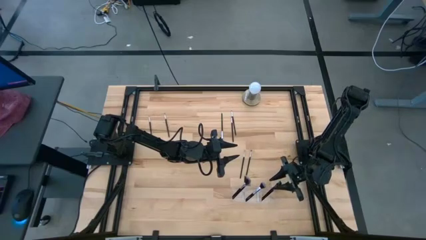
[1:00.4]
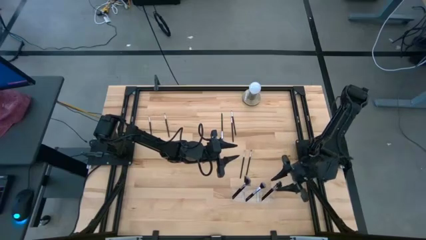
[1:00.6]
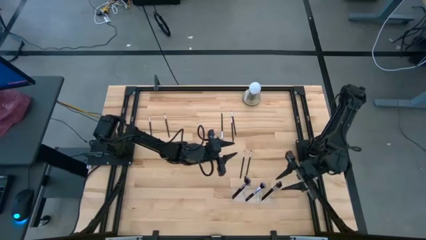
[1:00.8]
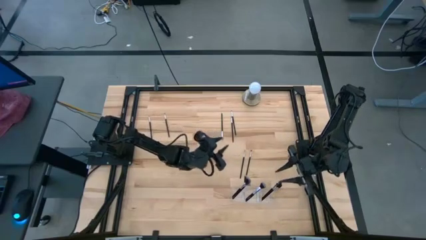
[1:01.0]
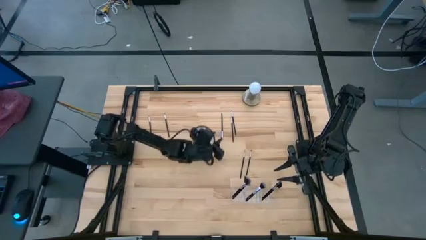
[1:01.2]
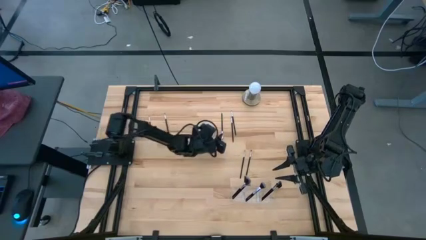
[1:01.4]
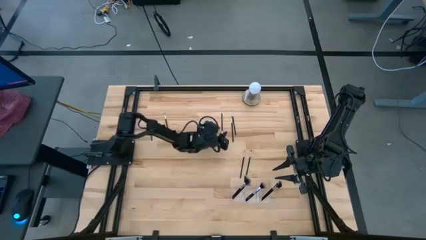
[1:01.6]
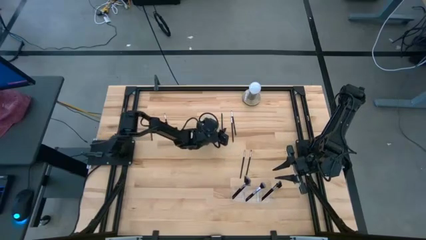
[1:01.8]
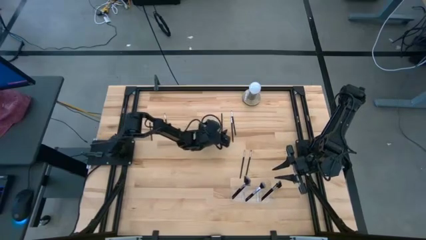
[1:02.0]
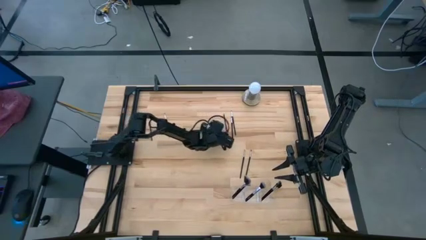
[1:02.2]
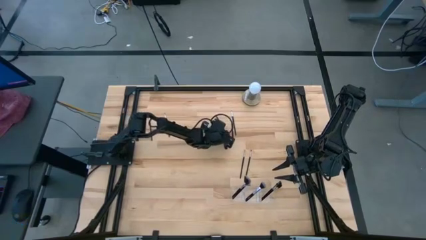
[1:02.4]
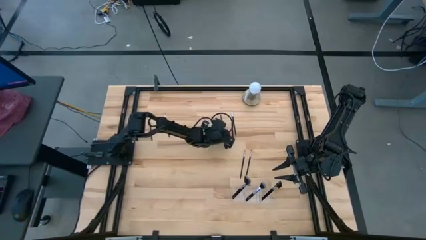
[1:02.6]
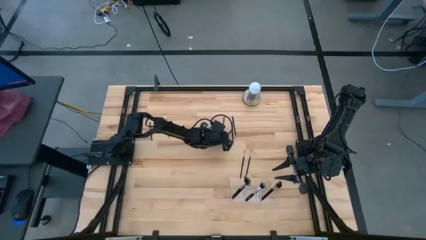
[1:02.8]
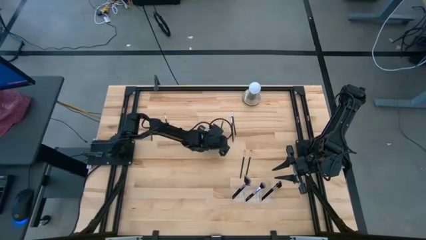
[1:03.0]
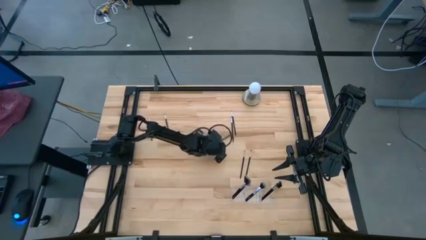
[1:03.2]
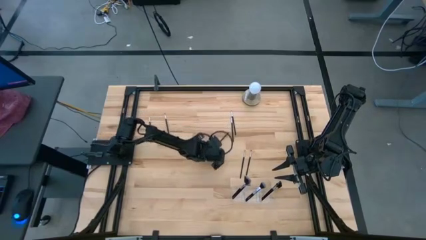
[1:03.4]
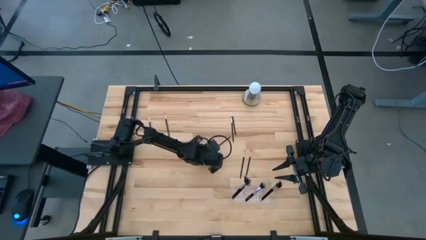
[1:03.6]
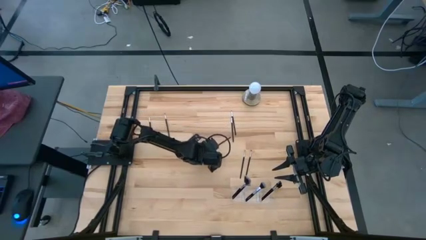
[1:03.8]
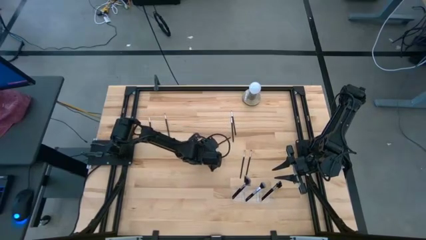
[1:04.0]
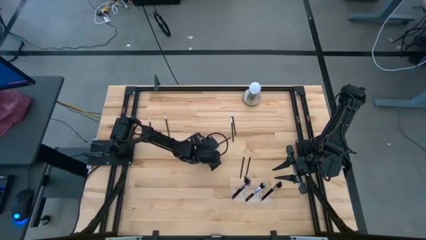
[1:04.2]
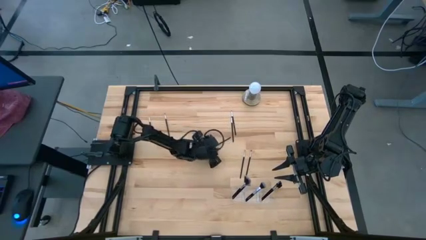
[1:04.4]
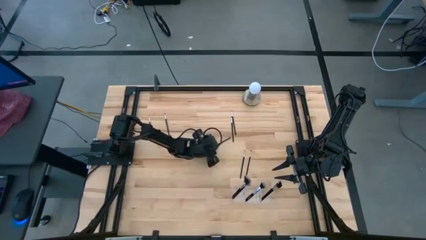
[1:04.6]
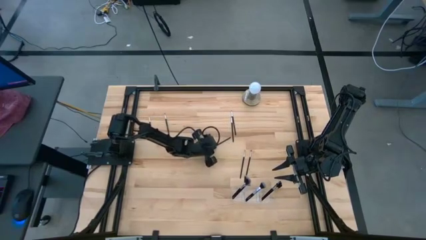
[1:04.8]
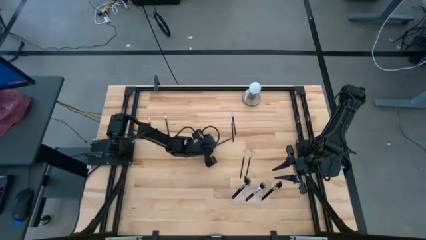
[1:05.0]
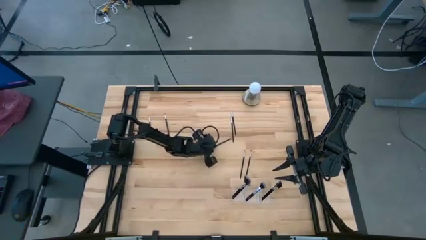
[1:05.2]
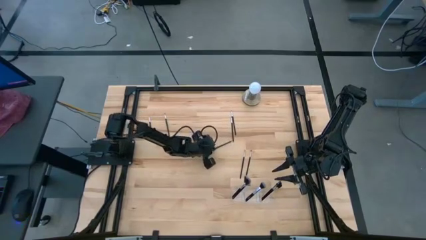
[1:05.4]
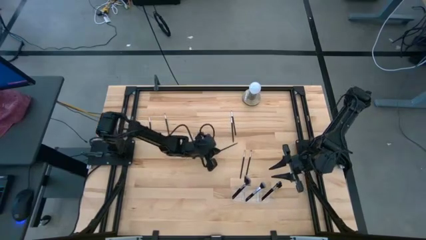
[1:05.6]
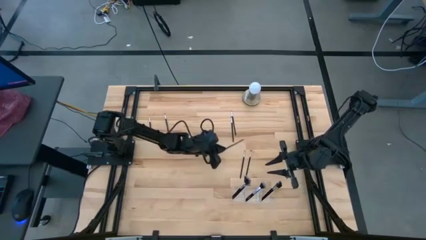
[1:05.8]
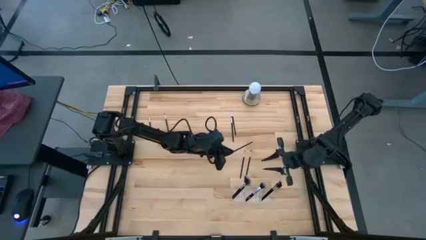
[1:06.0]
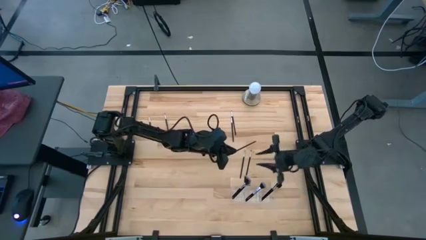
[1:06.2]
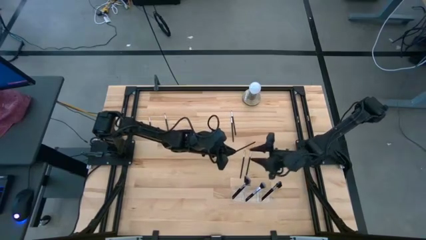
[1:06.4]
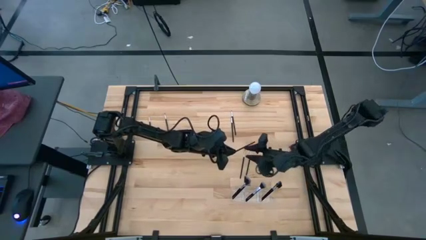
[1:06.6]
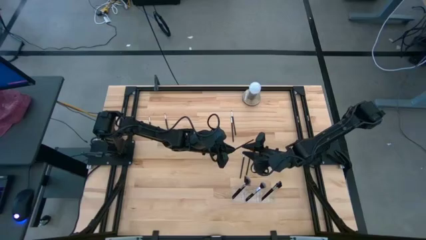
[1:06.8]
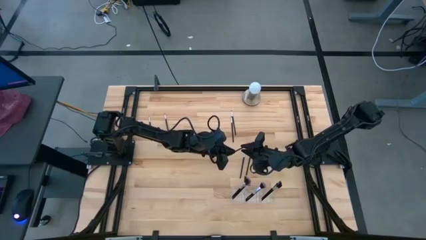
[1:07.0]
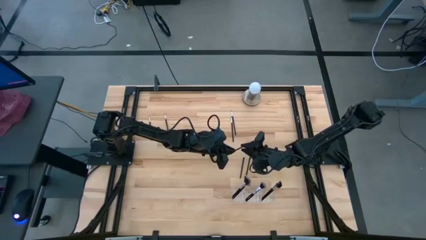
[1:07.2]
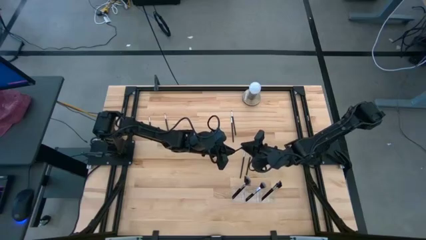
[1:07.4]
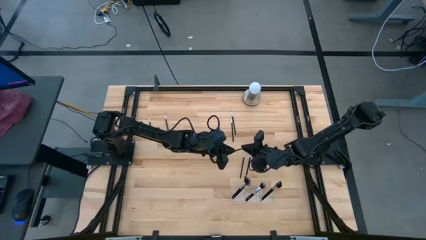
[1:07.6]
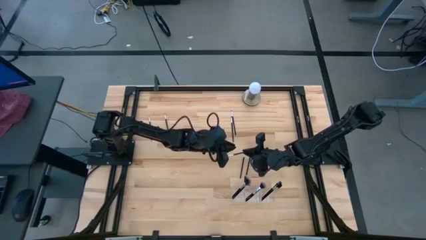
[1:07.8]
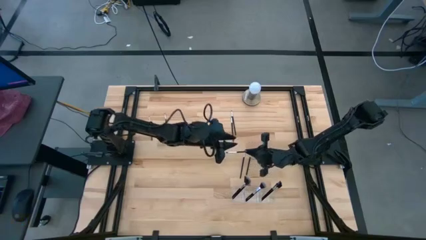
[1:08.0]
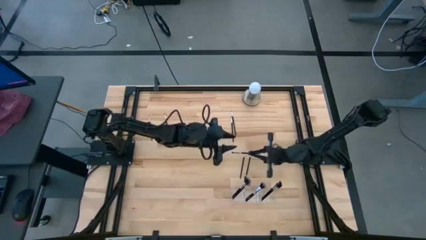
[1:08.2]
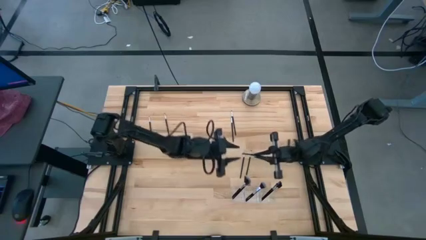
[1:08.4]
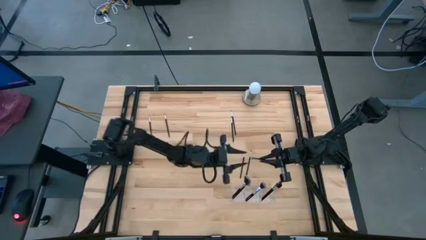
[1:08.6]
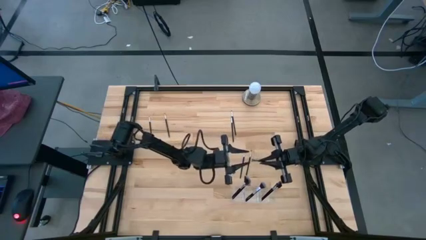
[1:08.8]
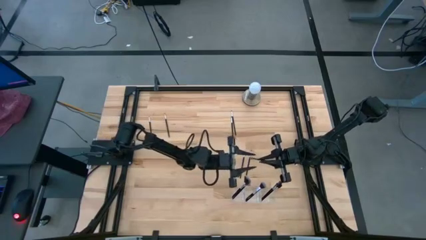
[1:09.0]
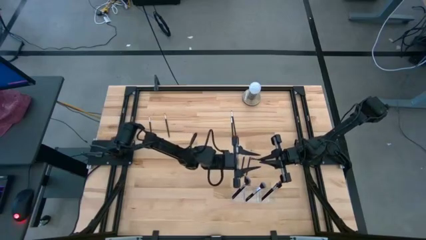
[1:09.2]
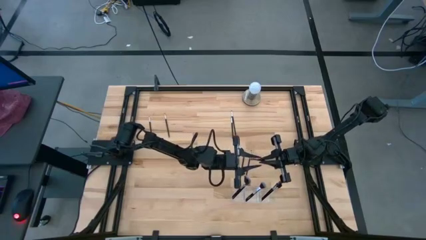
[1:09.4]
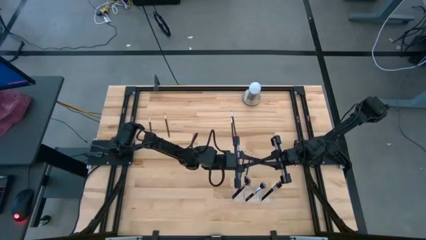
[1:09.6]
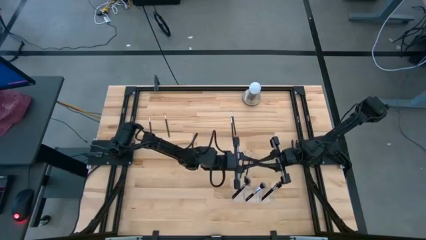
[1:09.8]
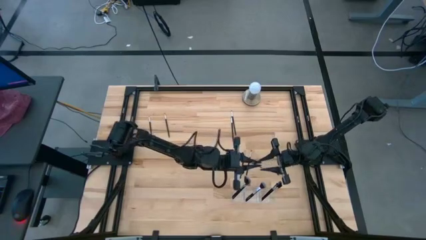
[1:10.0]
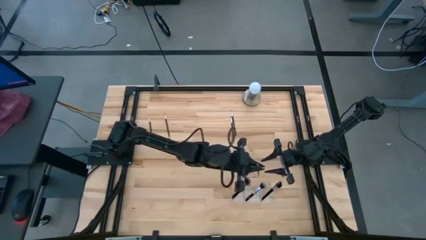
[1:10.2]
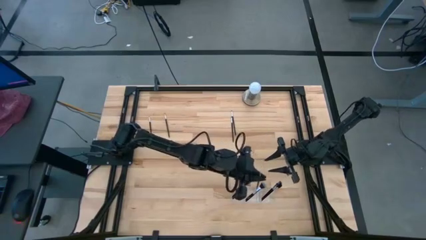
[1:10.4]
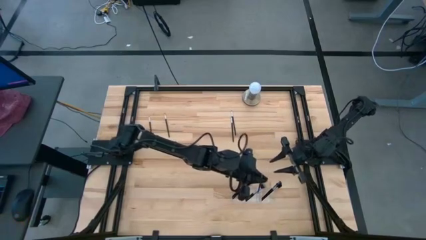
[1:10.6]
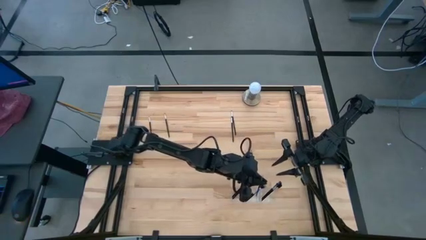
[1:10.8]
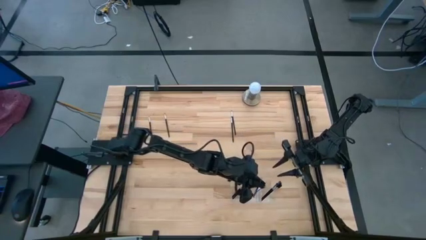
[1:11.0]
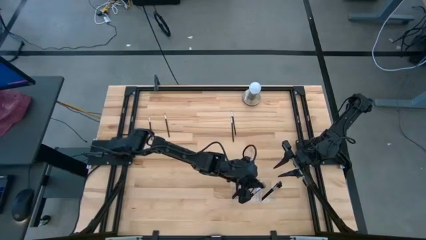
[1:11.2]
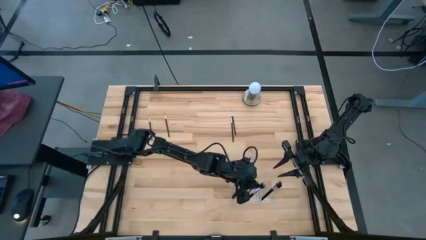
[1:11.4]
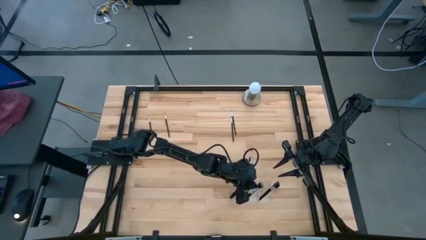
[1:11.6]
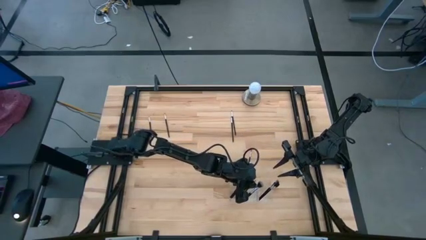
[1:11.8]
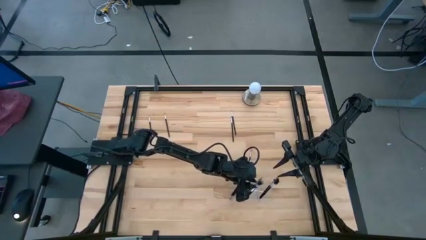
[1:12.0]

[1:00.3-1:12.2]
Task: Put items in baskets/containers
Put the eyeshadow brush into the middle section of the transparent organizer

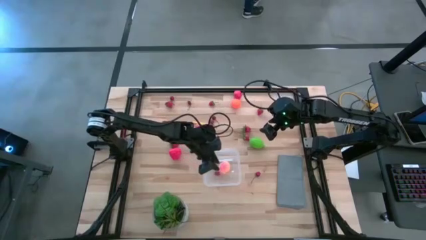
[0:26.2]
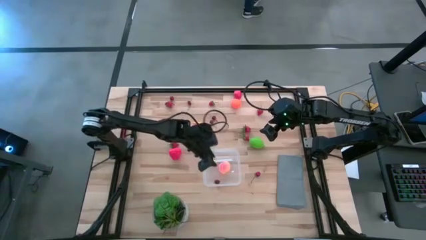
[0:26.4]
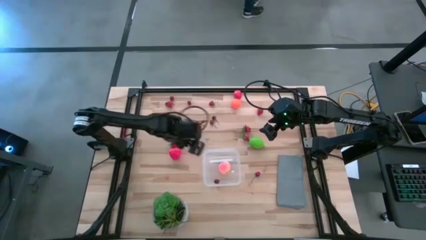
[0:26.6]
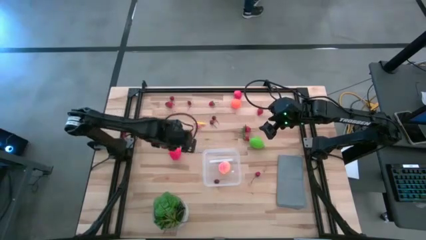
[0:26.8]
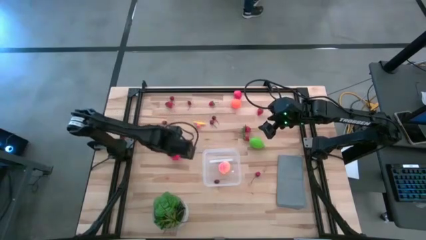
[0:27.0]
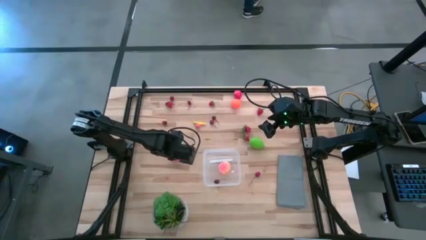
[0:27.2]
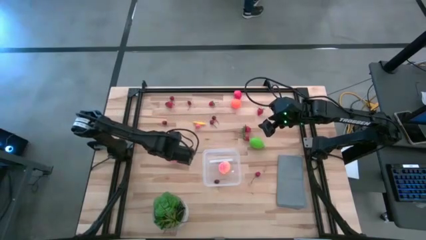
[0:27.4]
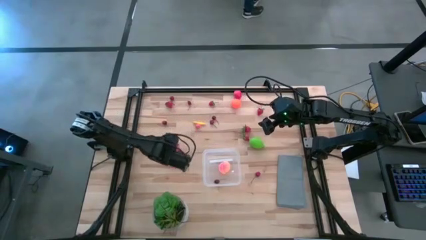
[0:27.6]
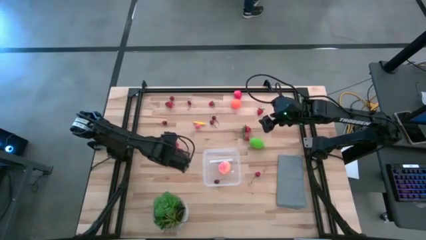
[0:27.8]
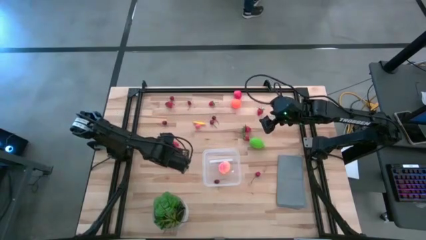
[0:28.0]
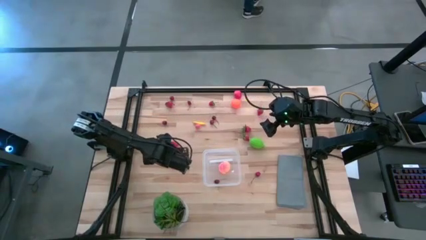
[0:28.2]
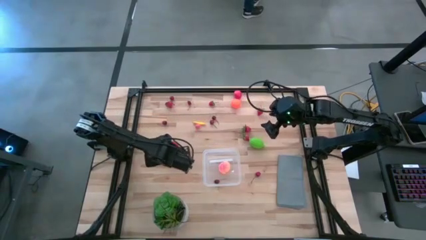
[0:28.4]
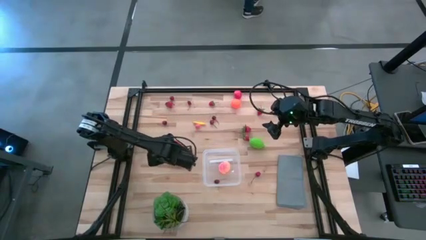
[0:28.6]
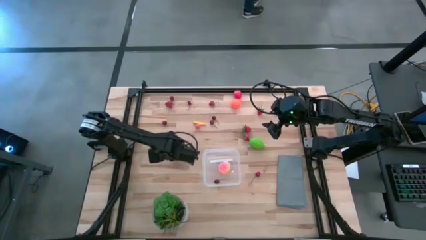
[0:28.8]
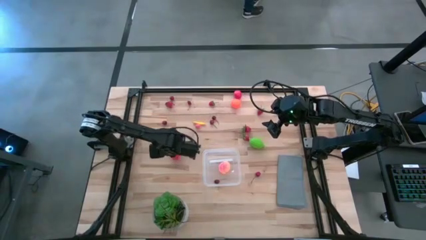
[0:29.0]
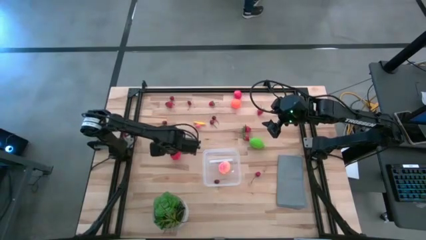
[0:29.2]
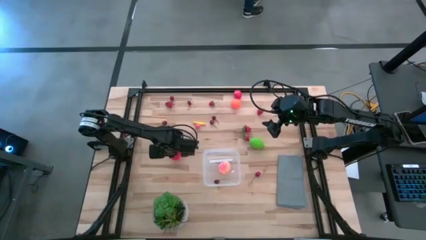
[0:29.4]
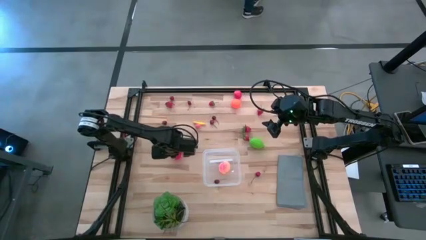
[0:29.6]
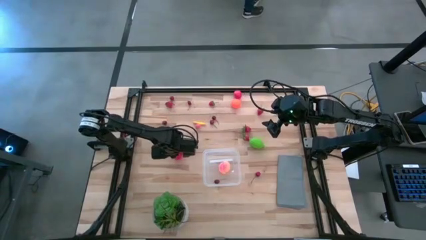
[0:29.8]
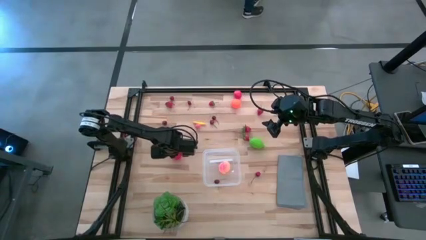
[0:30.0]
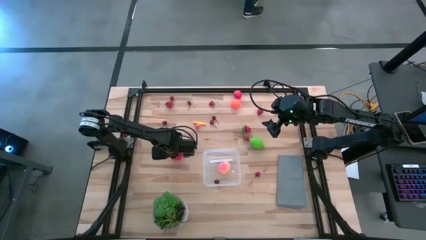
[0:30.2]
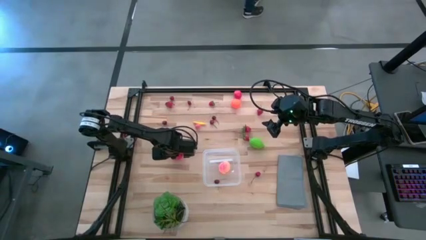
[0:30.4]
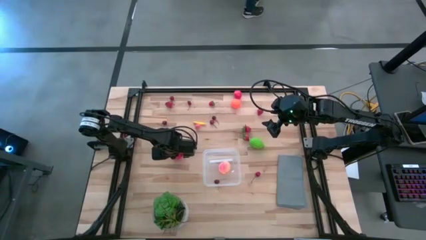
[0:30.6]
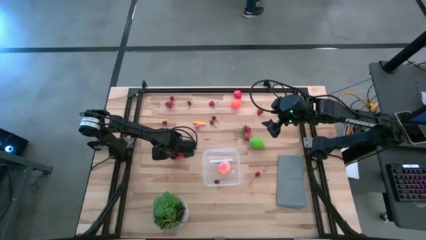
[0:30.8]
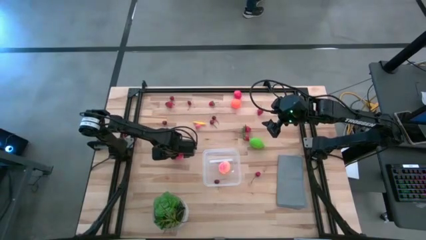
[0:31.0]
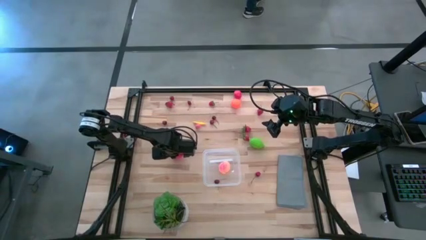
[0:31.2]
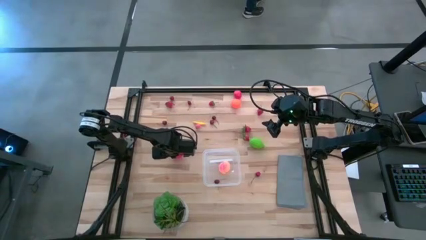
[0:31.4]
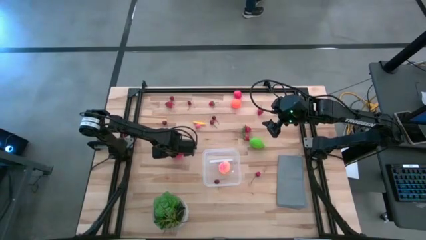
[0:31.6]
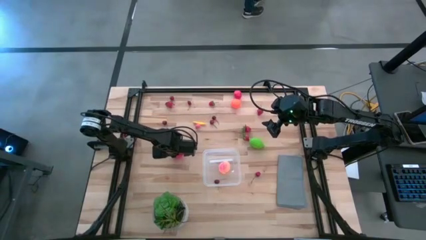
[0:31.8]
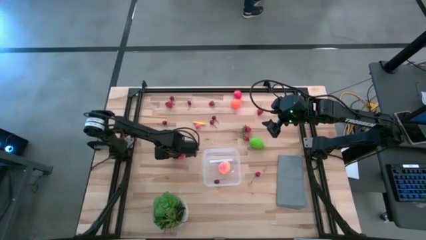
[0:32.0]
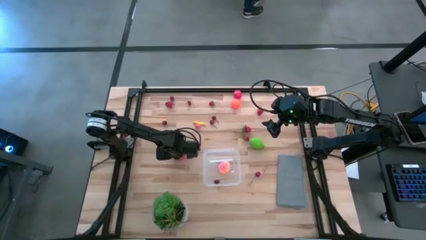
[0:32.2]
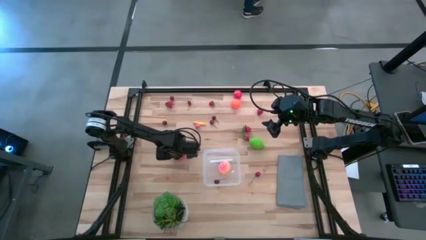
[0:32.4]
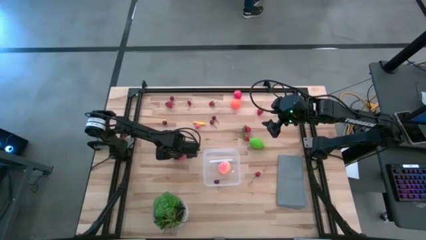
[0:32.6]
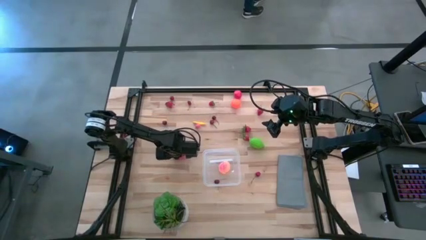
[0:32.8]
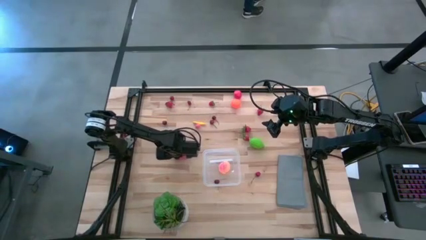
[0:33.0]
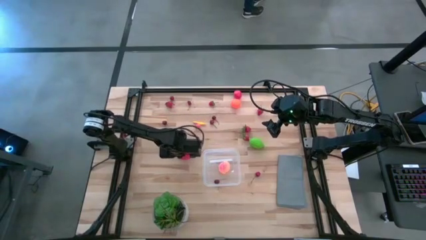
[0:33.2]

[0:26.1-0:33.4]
Task: Pick and placing Produce into tupperware
Put the red apple into the transparent bin
